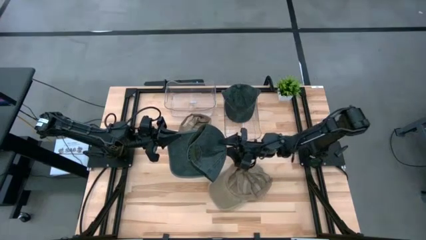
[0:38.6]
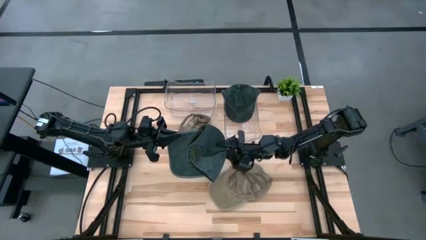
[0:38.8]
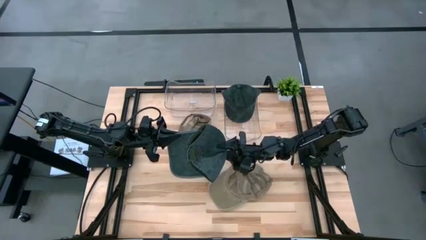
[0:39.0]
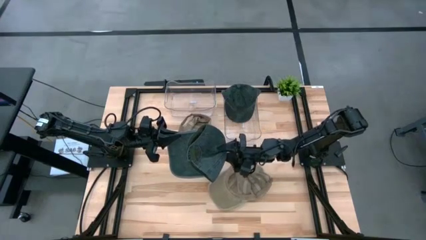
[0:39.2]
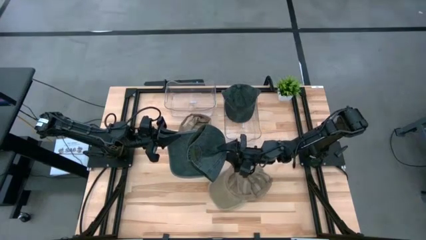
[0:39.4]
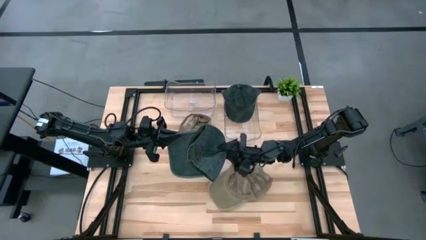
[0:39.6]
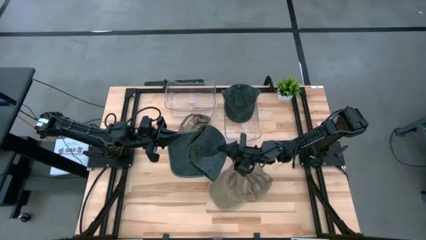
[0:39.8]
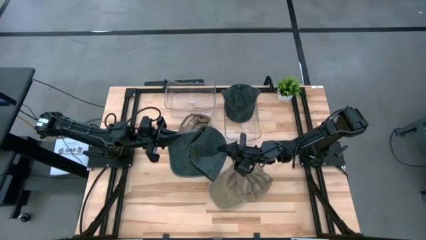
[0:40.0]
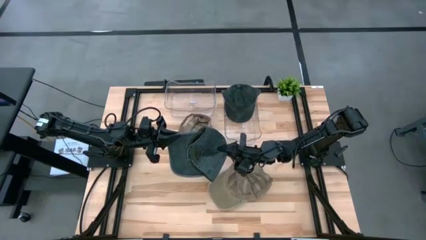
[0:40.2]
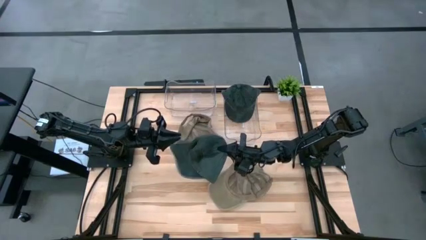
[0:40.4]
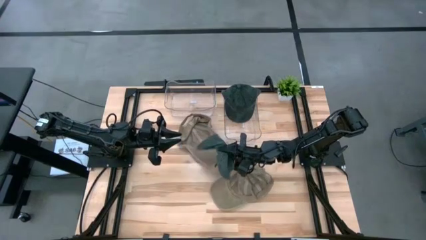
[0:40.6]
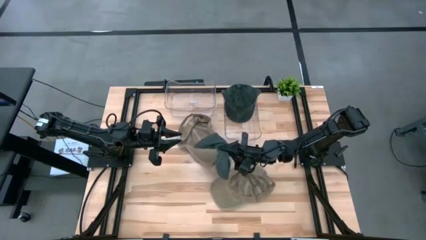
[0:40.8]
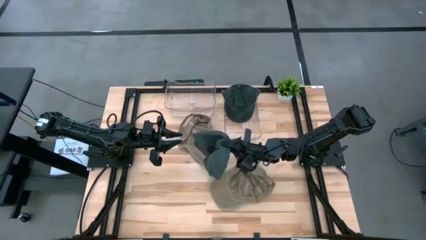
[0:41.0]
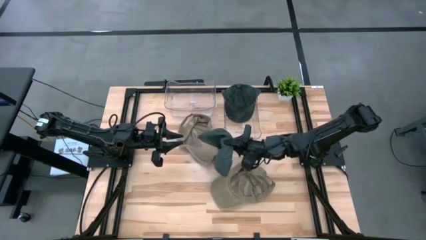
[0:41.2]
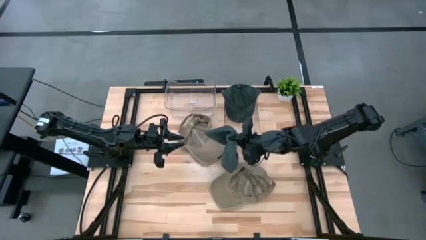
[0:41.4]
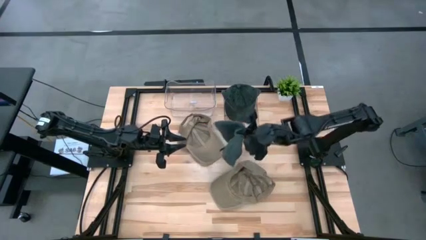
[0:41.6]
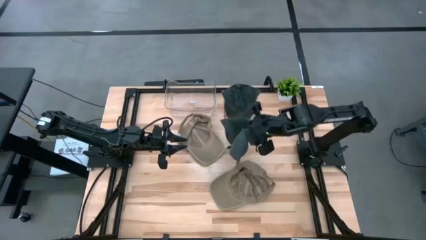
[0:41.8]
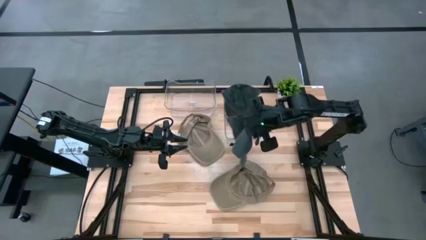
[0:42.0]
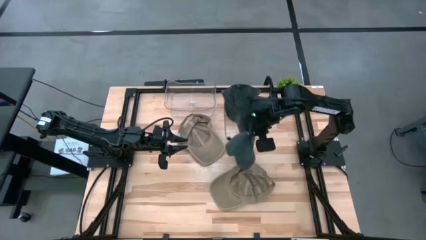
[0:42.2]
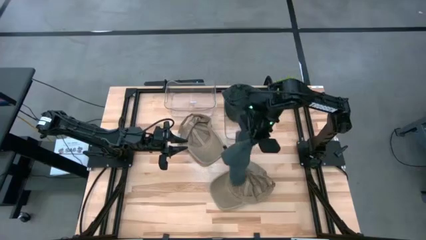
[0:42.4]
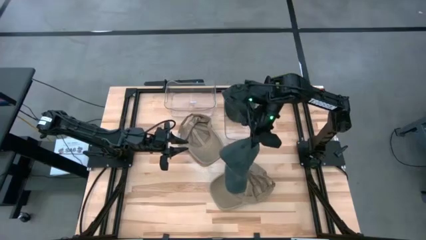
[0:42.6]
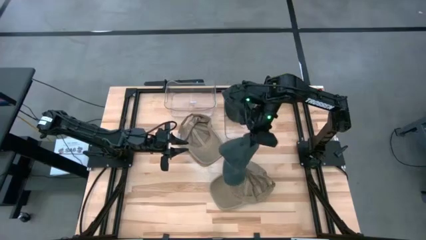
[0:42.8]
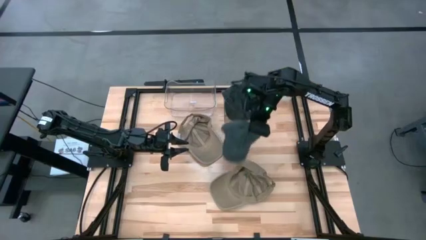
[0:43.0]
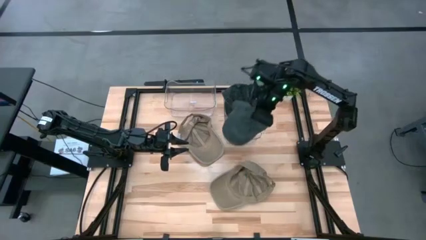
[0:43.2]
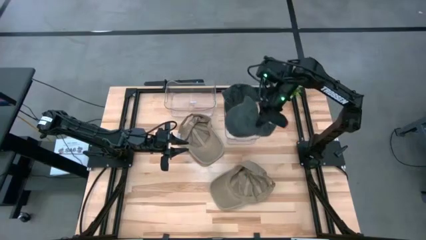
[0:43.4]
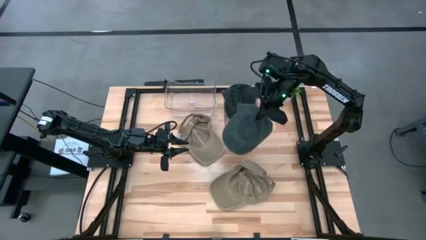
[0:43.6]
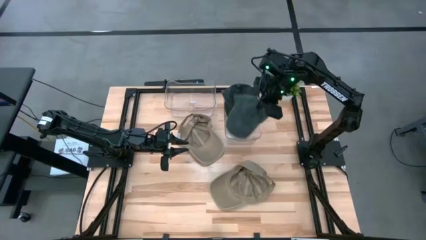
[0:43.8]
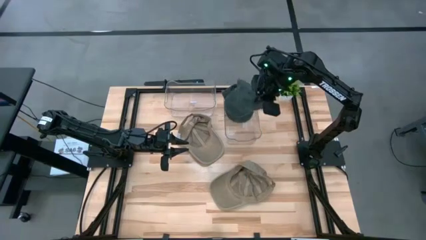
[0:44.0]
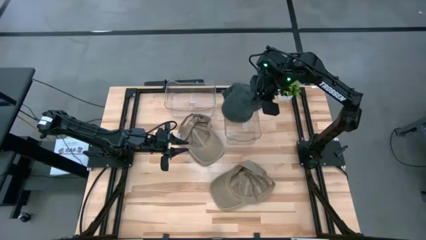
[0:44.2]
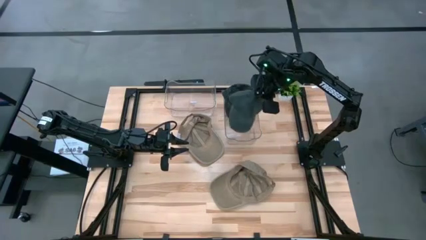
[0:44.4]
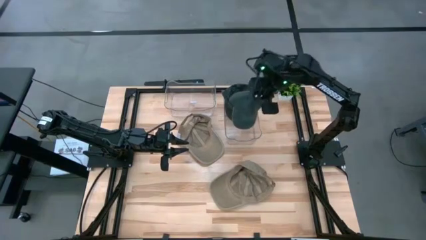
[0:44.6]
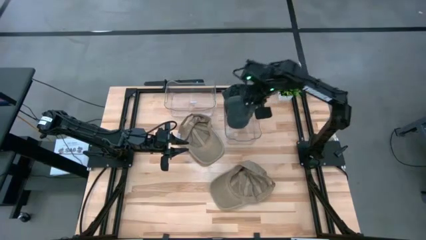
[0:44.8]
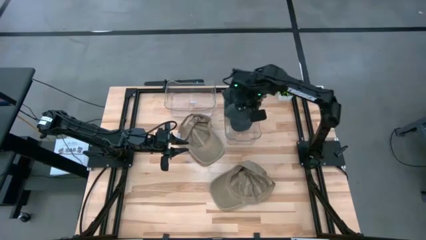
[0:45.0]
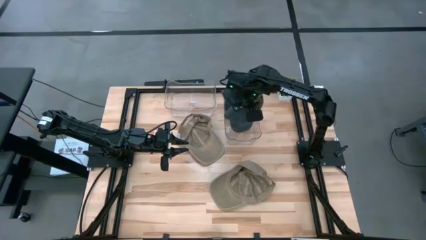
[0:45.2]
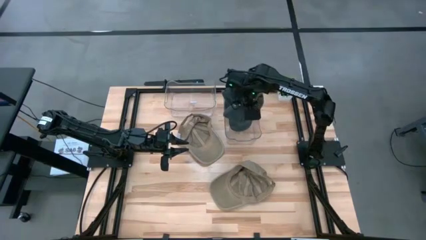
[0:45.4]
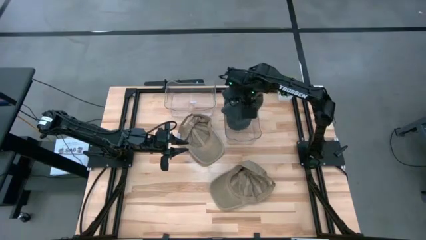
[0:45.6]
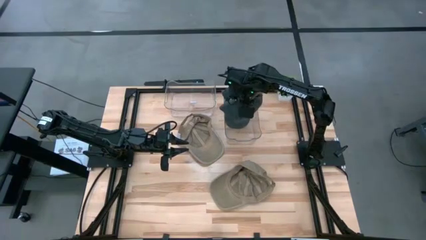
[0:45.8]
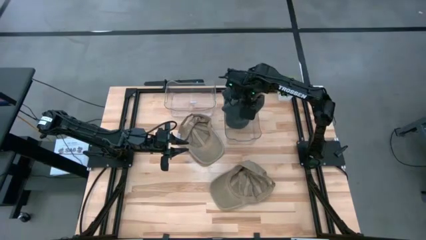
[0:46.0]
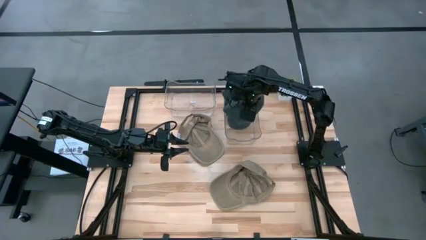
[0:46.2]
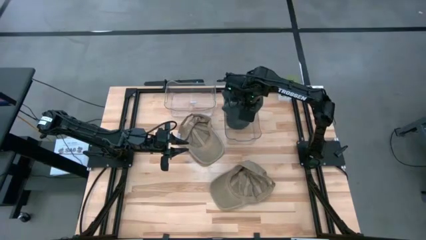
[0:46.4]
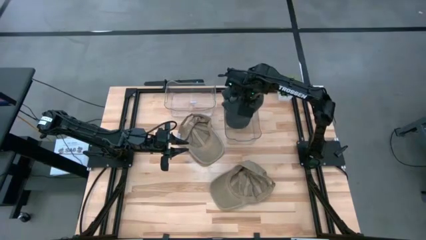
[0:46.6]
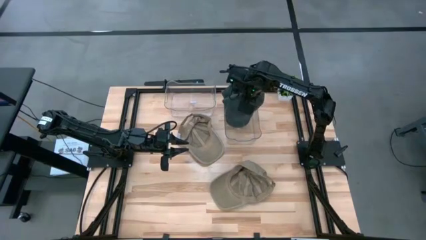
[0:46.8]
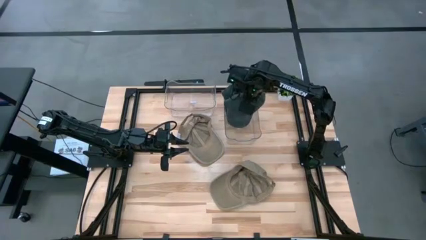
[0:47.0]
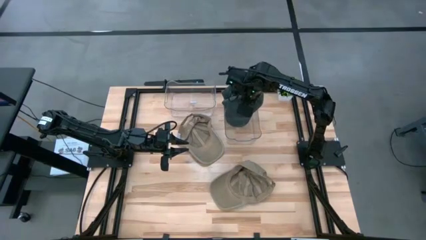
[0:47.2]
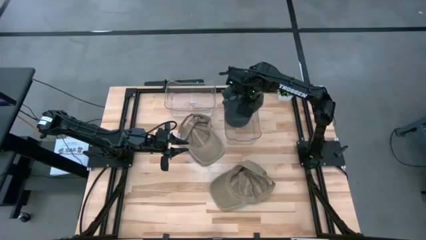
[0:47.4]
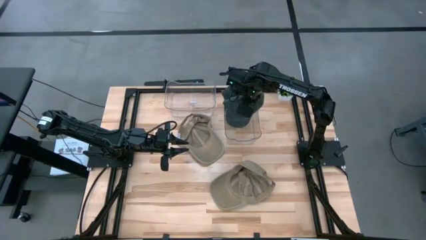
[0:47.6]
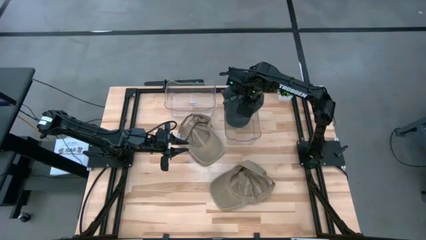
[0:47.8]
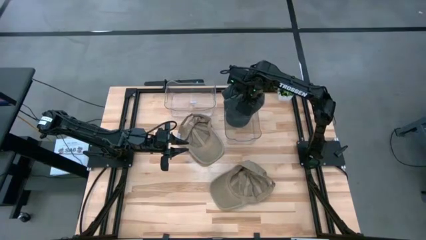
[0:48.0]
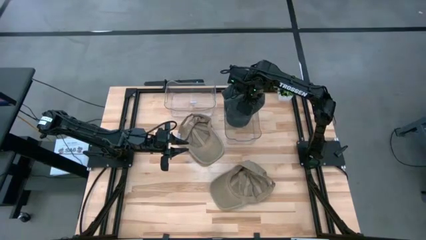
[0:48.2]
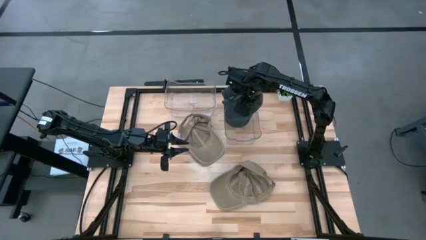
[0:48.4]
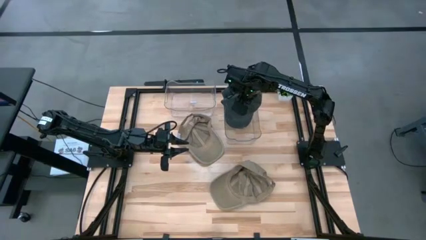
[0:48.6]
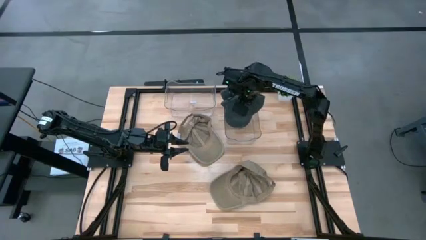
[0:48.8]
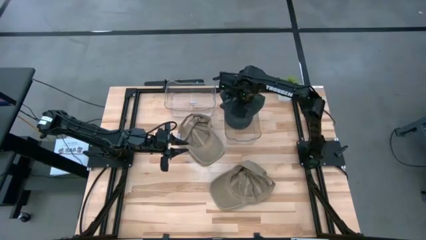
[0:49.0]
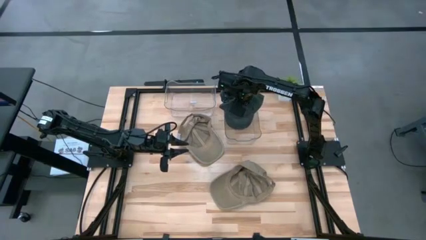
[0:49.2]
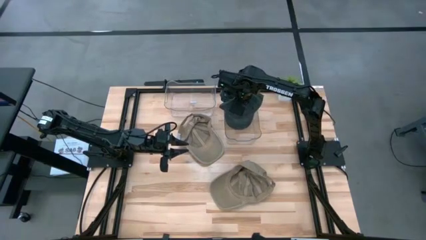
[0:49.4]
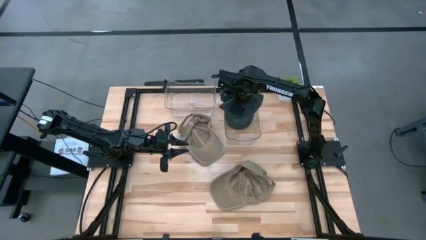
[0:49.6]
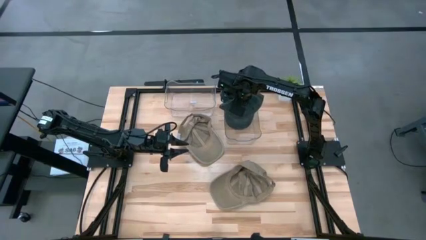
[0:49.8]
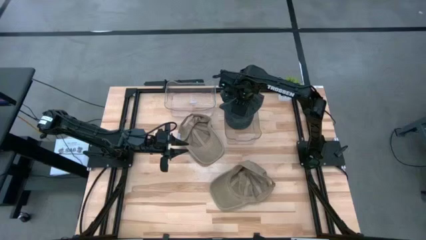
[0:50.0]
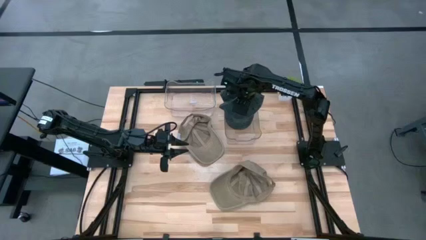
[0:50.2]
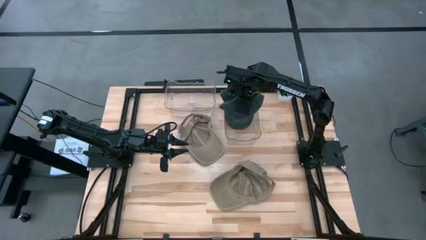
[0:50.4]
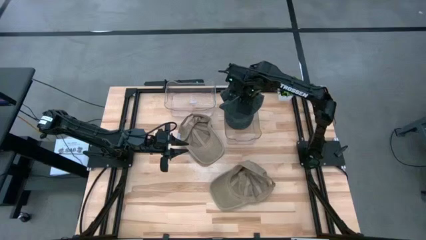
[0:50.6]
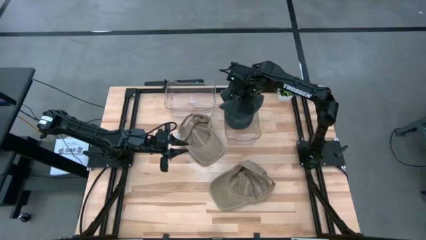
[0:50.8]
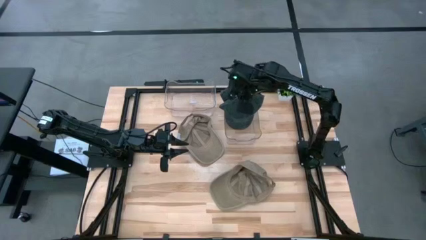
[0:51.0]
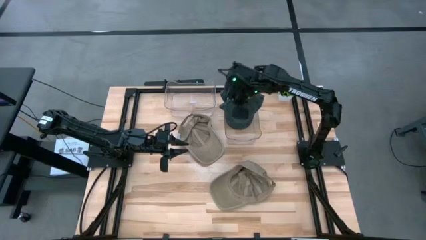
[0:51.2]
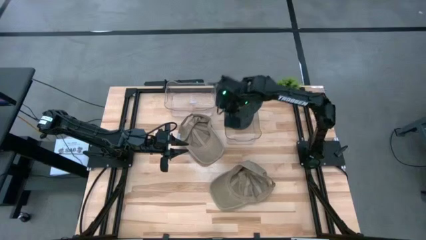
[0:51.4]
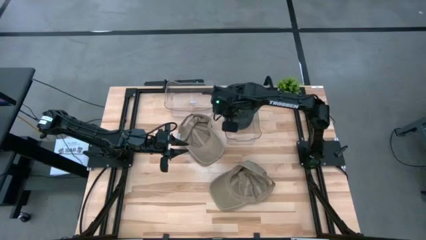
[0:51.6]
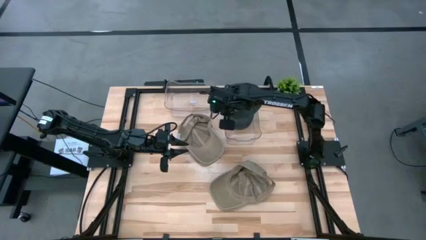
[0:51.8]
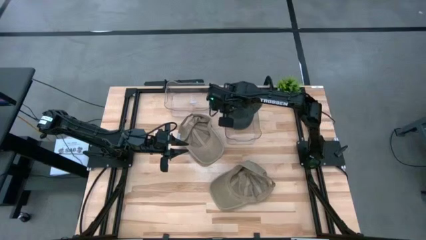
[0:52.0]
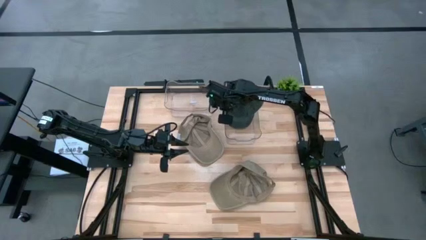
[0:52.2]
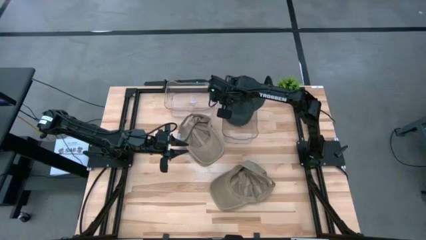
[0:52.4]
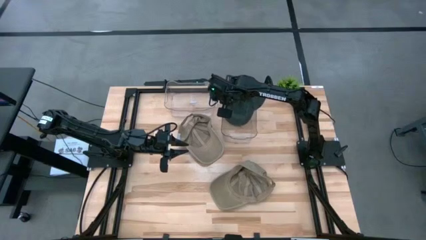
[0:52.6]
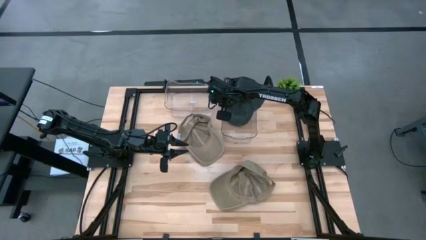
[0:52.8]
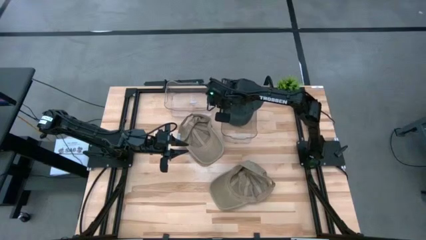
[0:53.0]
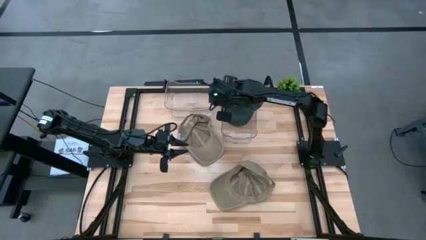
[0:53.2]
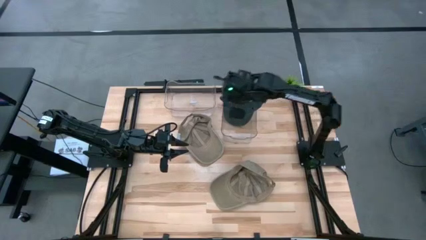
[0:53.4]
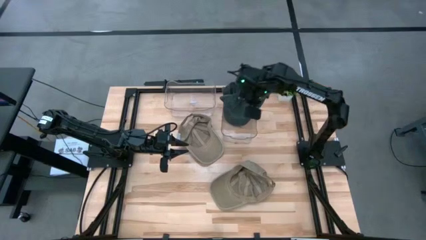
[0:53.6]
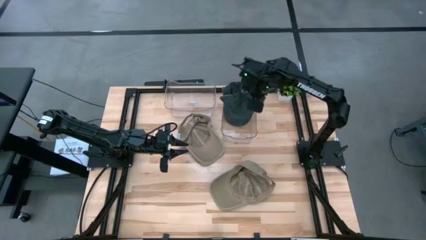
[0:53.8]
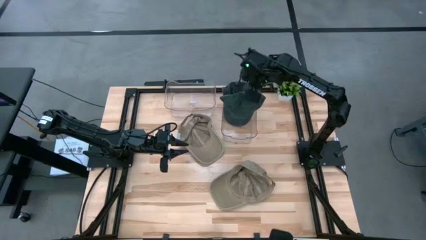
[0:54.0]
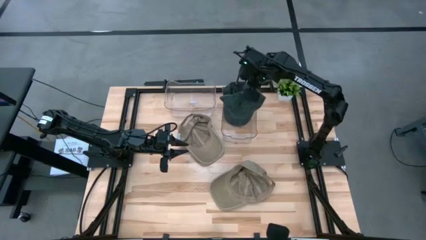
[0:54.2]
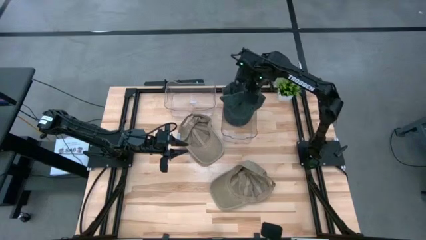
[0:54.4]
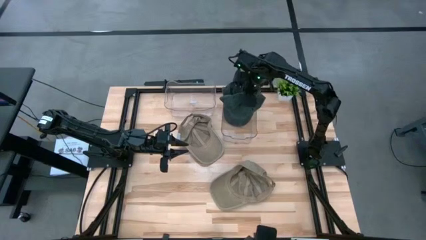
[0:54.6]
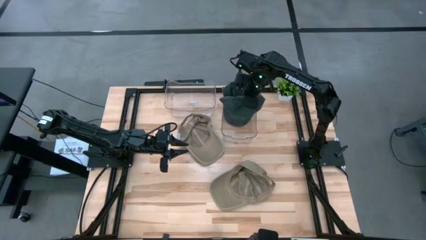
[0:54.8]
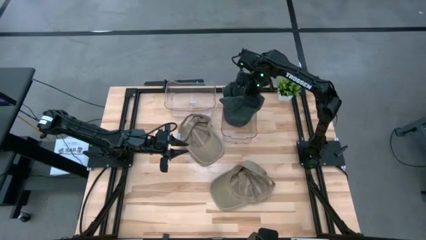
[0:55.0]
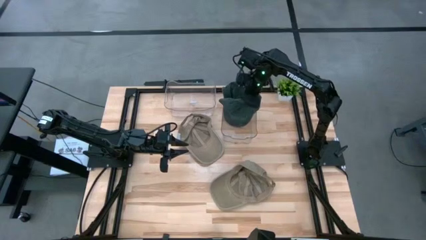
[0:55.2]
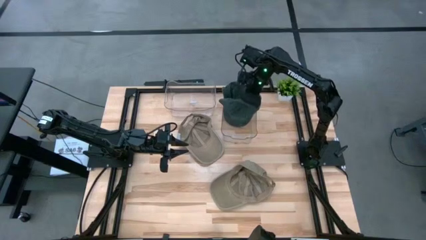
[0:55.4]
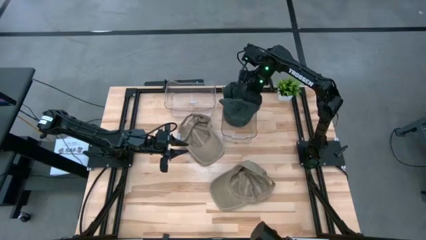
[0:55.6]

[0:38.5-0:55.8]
Task: Pick & Place hat
Put the gray cap into the right transparent bin
